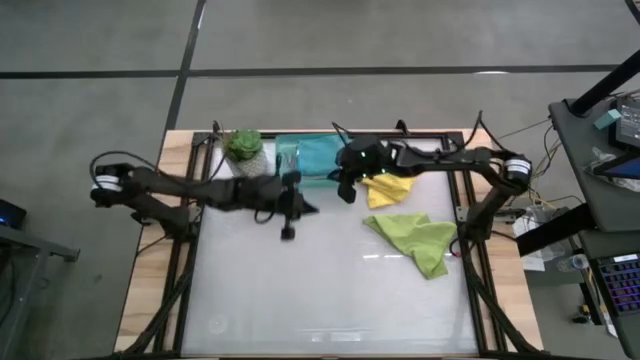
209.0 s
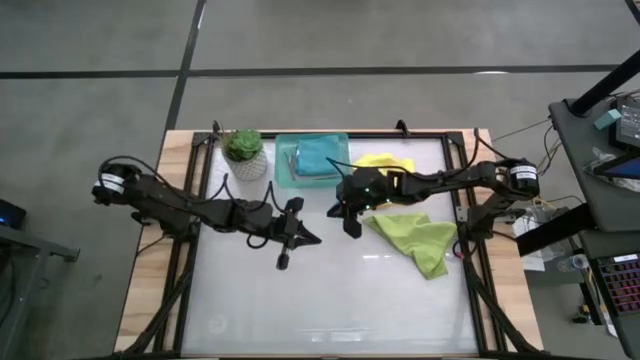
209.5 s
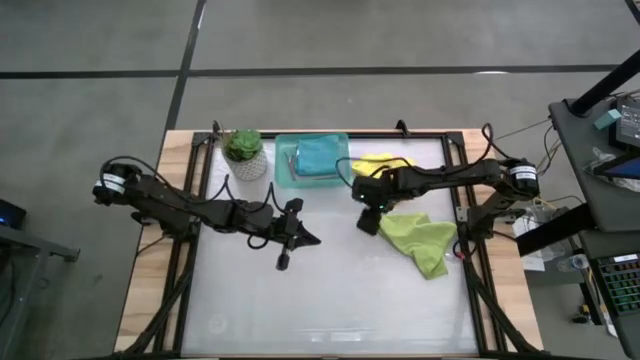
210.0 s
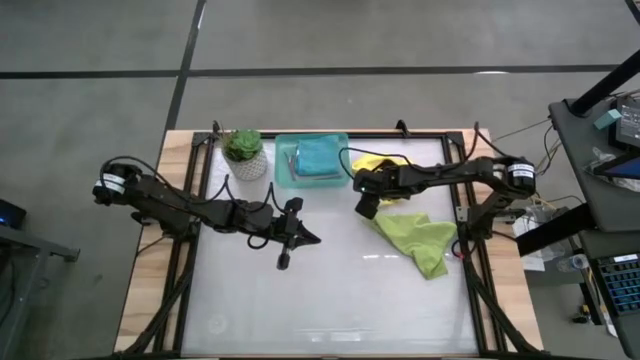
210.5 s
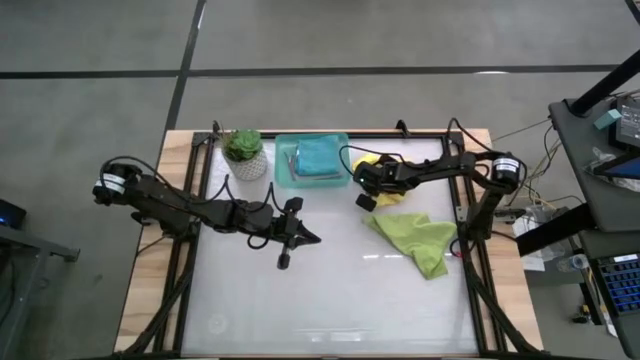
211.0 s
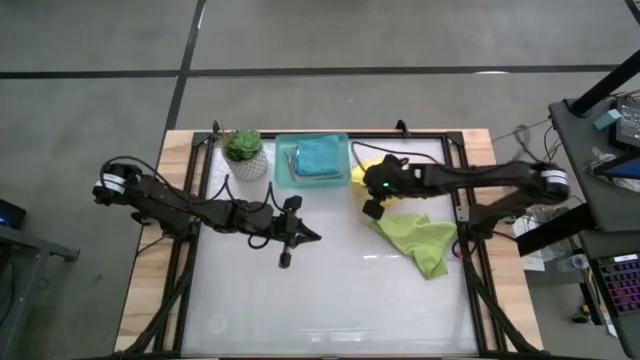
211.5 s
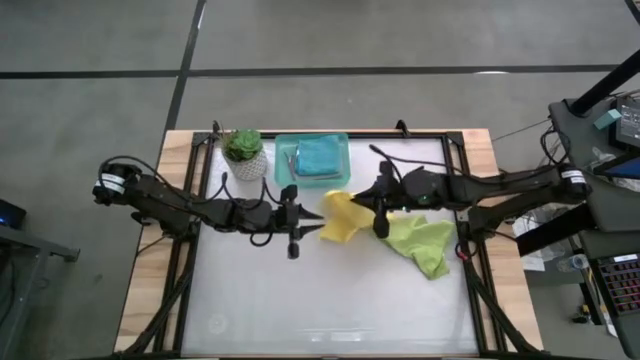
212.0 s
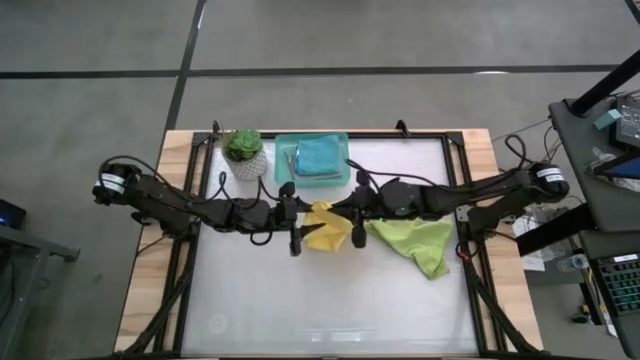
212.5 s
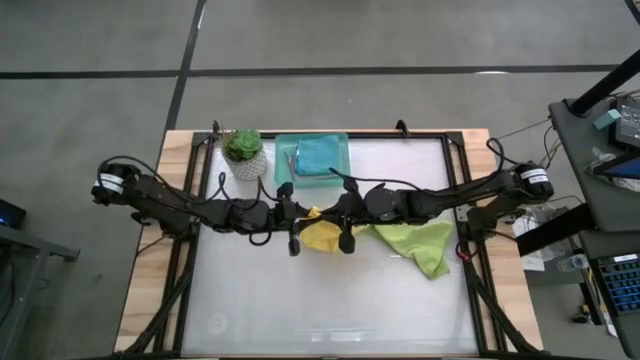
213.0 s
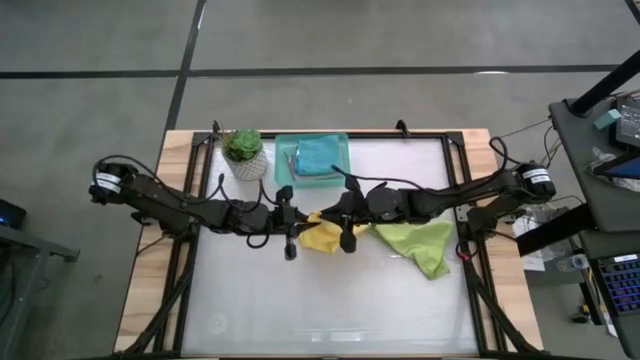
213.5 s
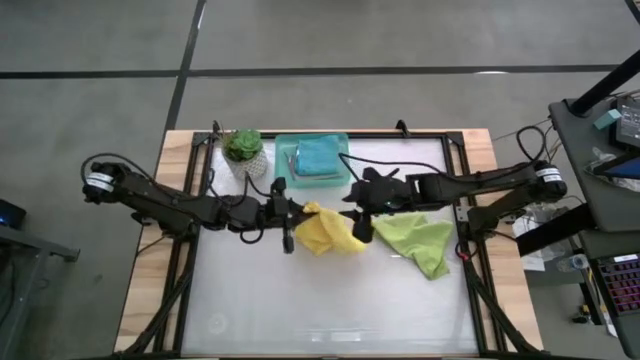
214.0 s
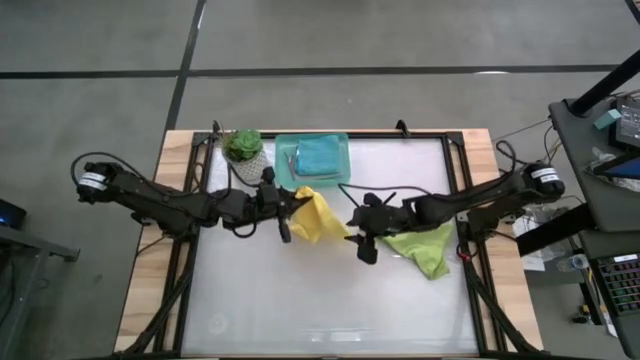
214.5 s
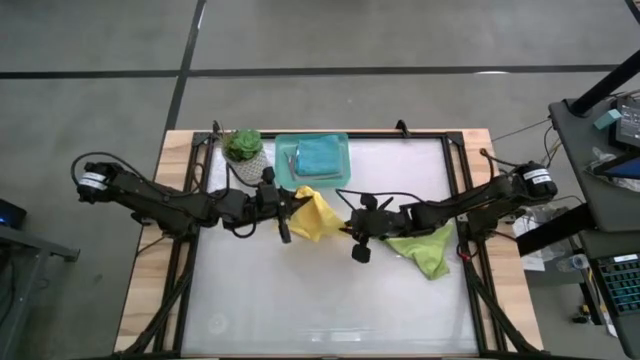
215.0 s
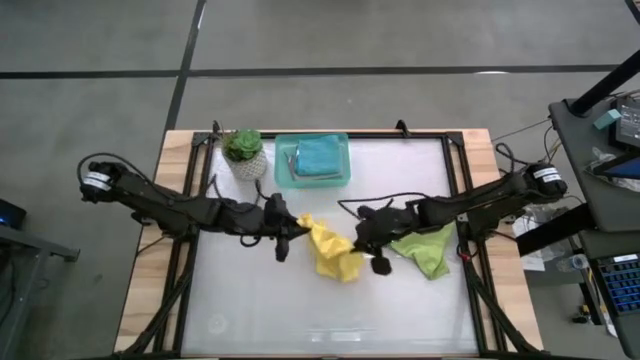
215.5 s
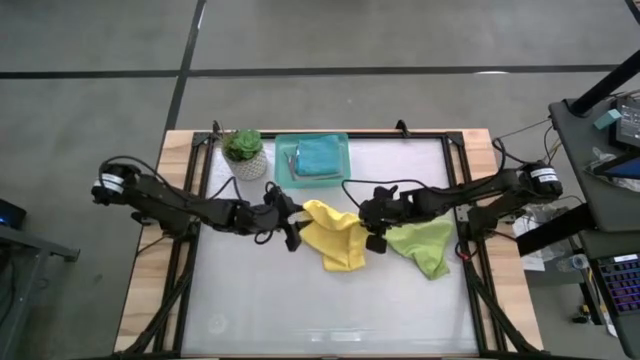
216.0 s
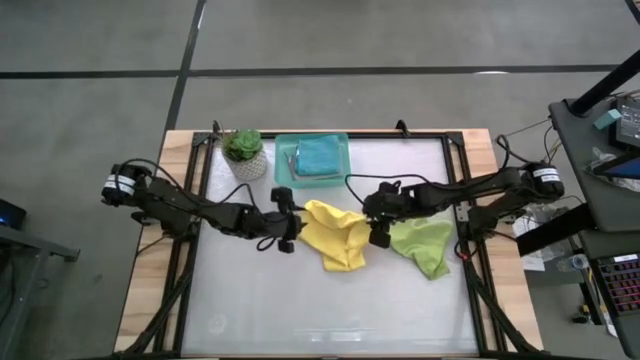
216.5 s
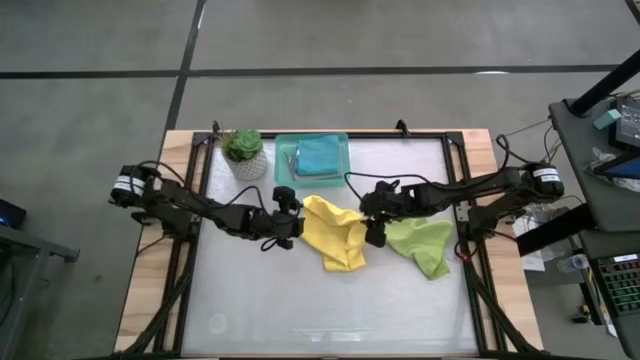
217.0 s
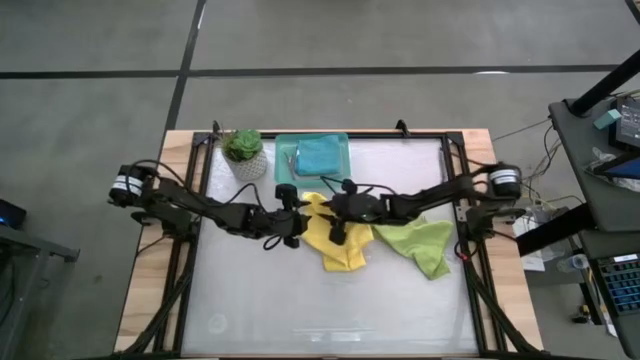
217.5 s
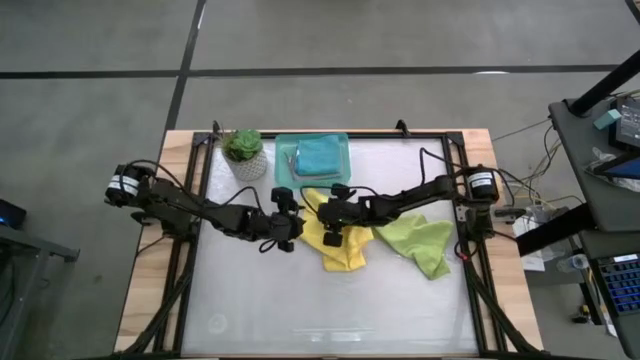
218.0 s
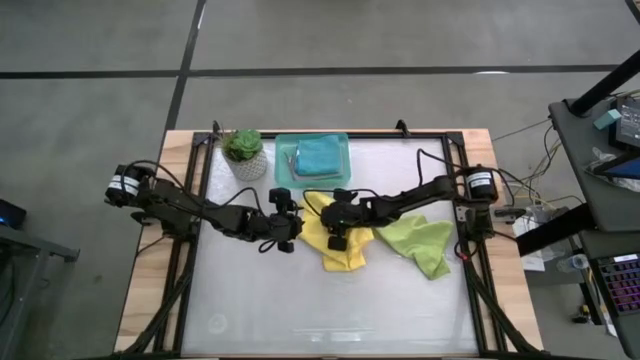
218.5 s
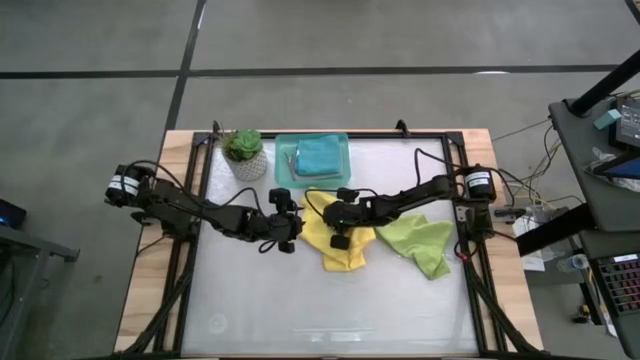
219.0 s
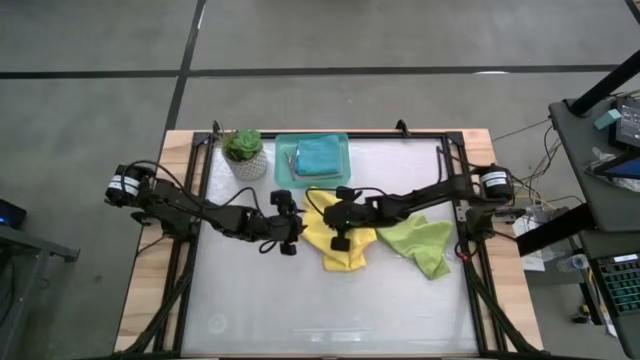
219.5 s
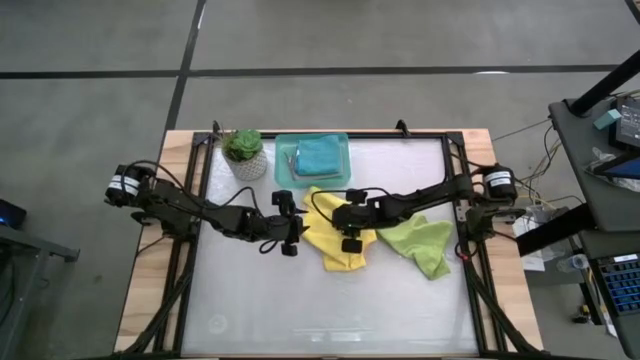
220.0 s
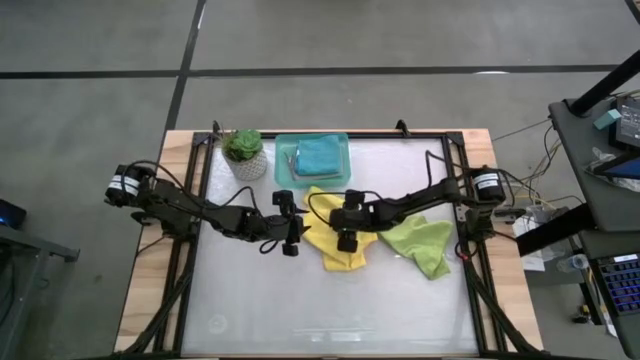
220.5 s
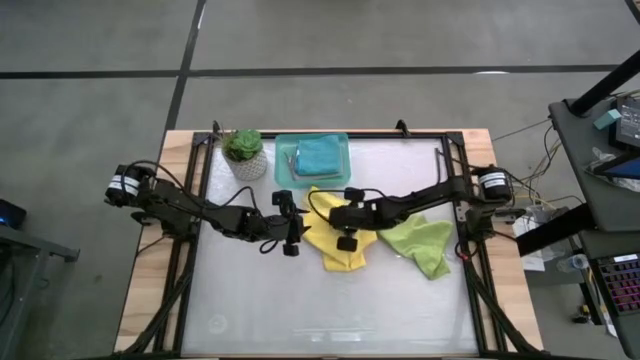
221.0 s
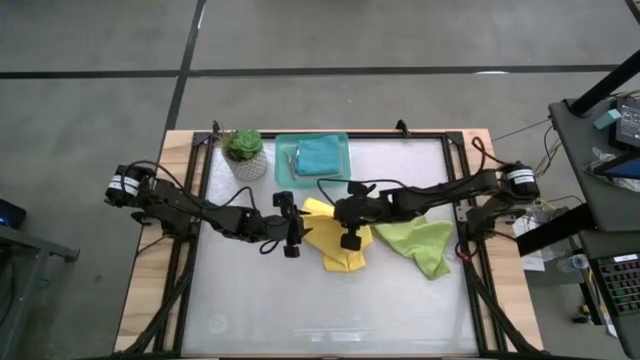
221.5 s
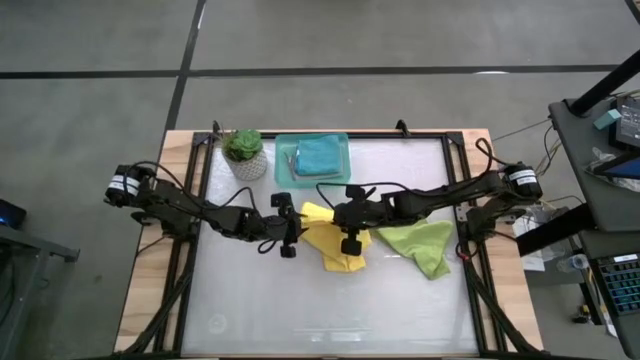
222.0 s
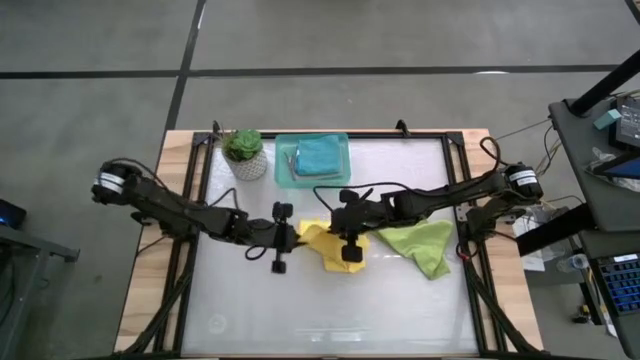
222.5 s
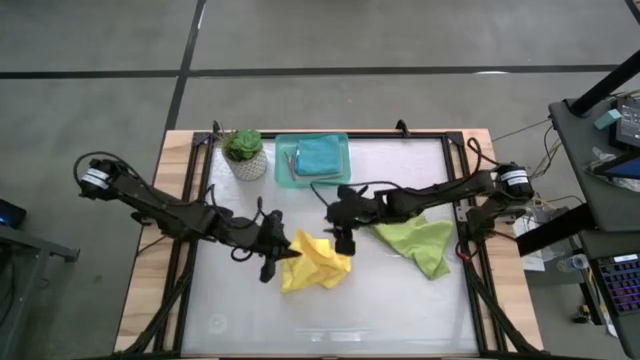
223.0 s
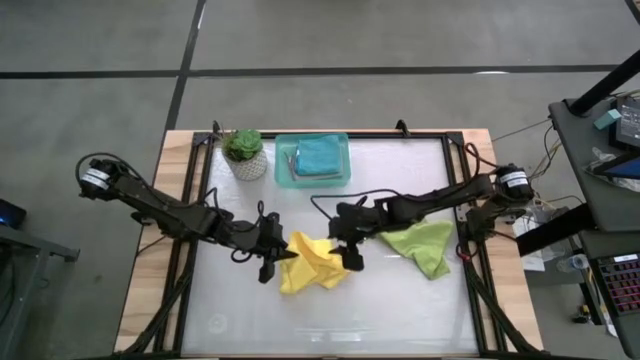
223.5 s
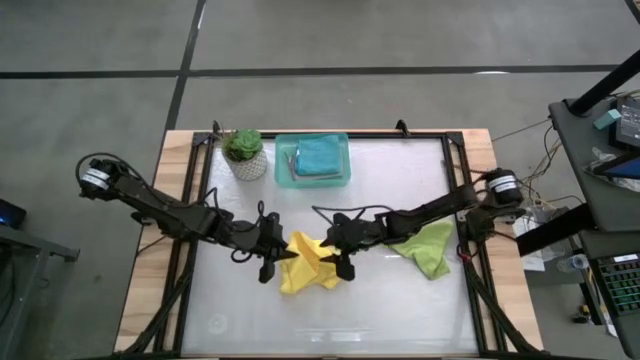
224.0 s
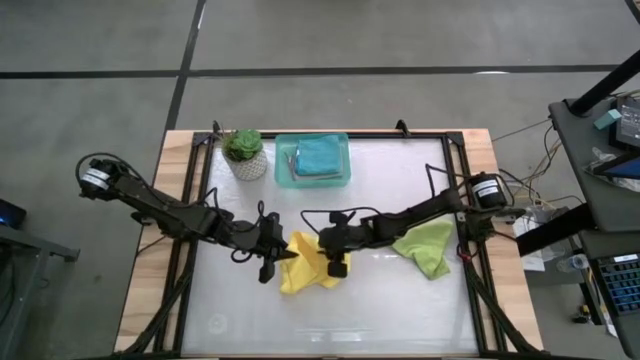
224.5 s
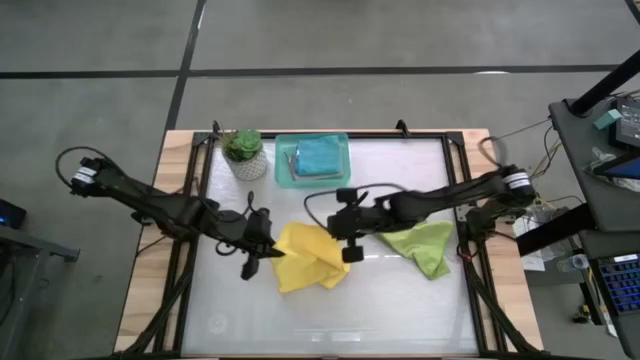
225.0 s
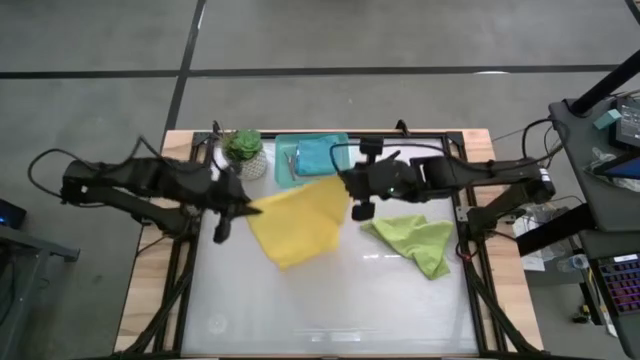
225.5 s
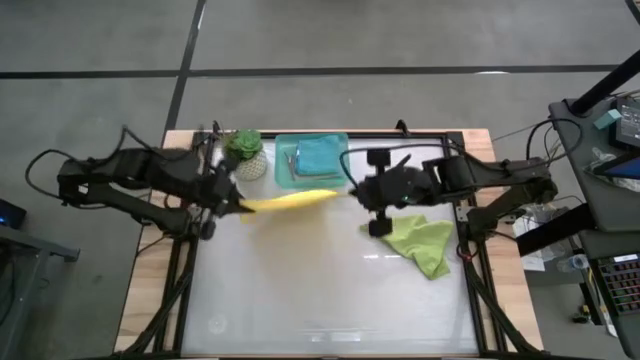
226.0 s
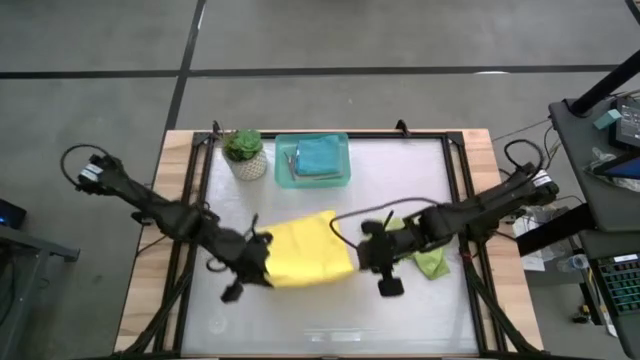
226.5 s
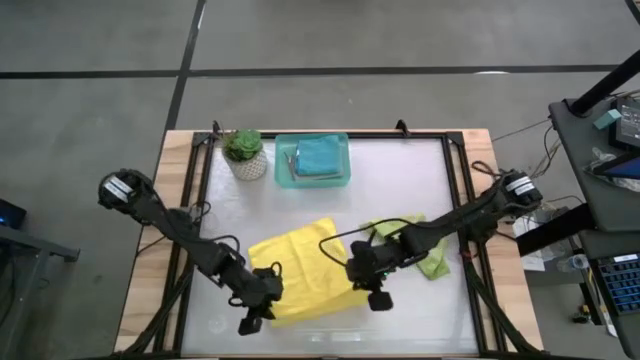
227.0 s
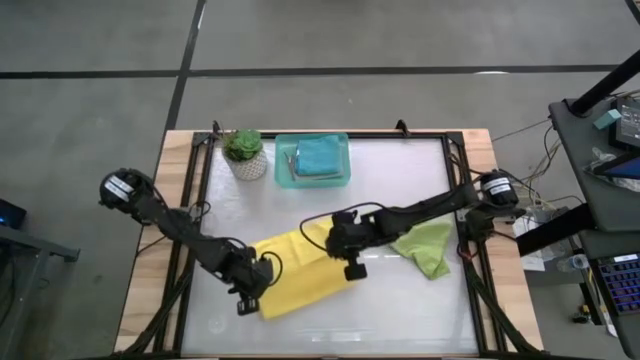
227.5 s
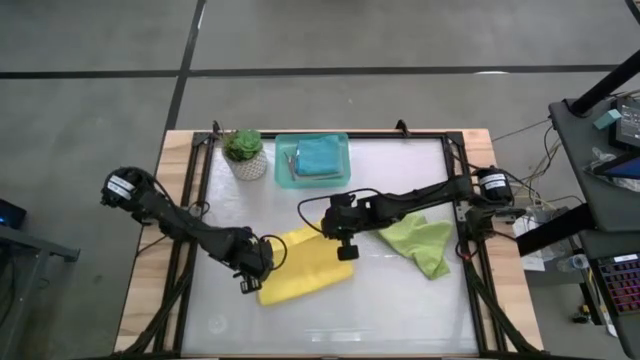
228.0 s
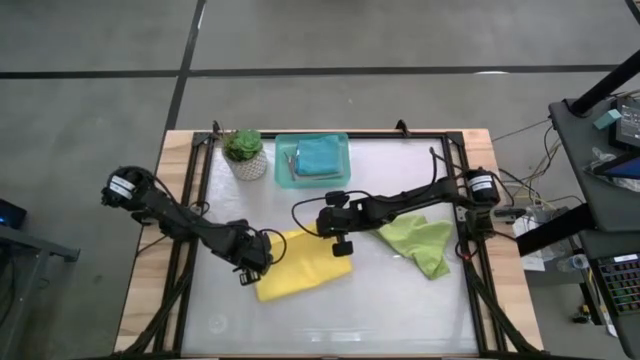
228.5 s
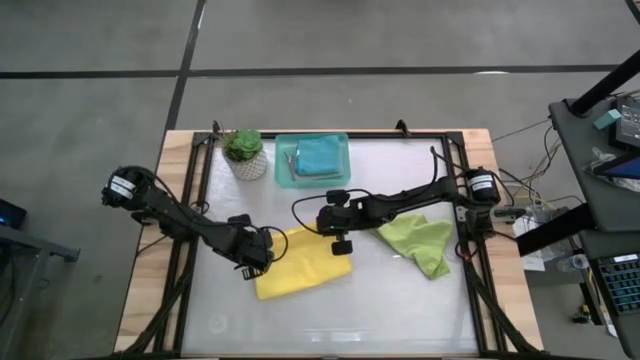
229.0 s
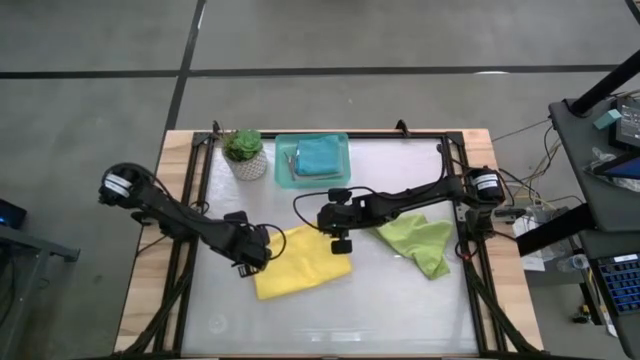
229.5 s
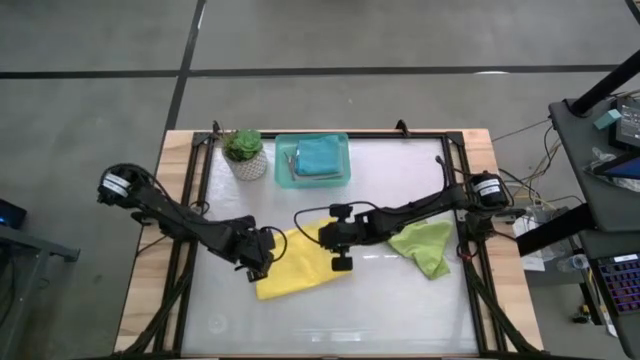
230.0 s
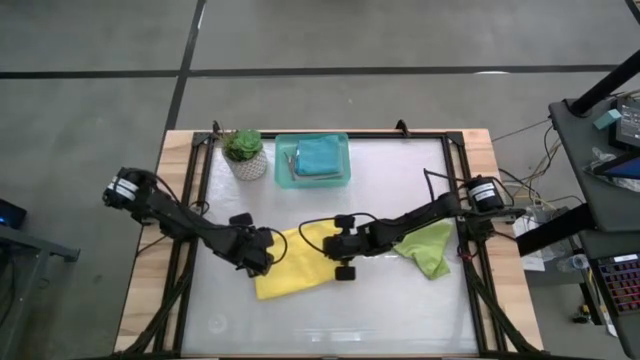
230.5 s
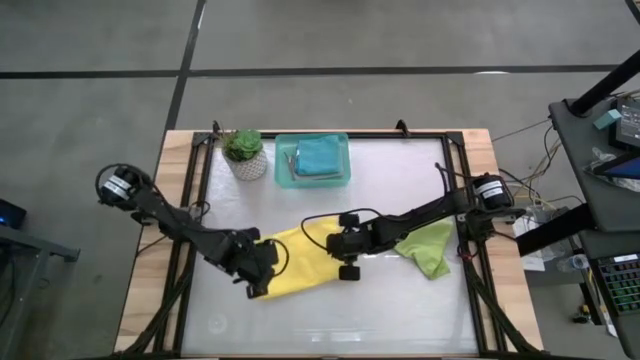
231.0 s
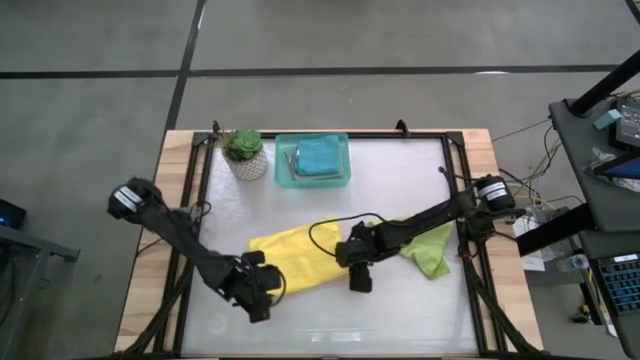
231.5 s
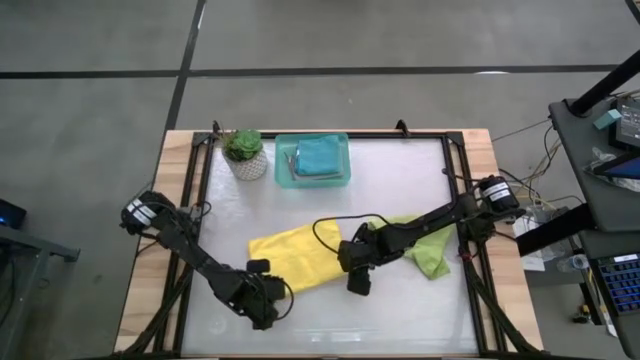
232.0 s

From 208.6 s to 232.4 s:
Task: Fold microfiber towels
Fold the yellow microfiber cloth
